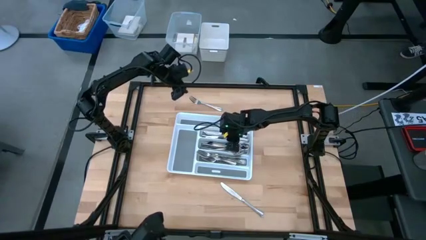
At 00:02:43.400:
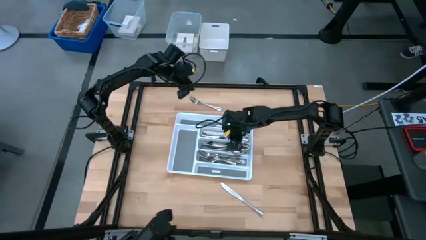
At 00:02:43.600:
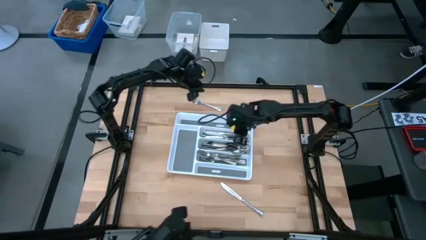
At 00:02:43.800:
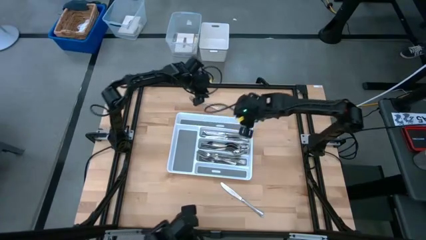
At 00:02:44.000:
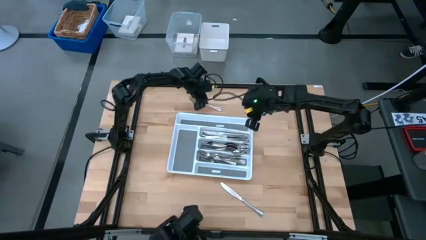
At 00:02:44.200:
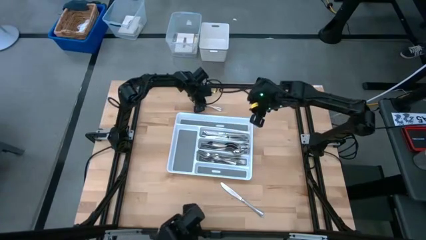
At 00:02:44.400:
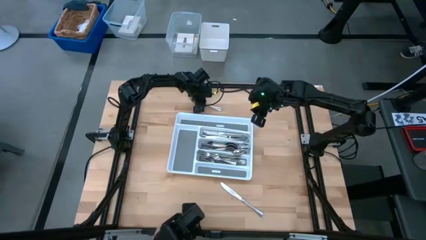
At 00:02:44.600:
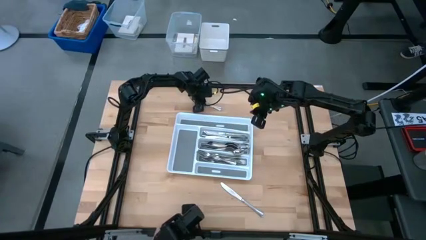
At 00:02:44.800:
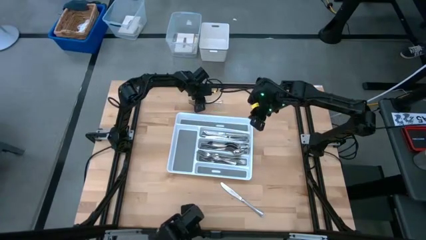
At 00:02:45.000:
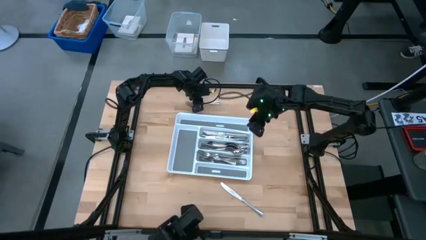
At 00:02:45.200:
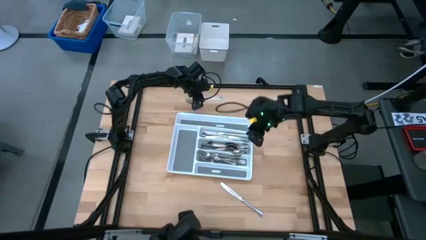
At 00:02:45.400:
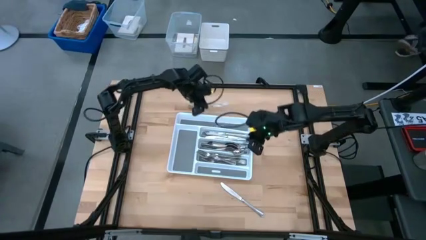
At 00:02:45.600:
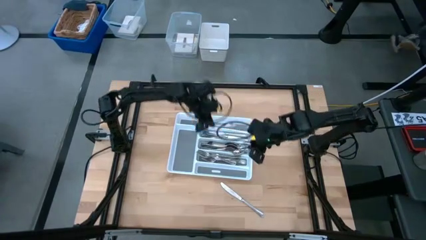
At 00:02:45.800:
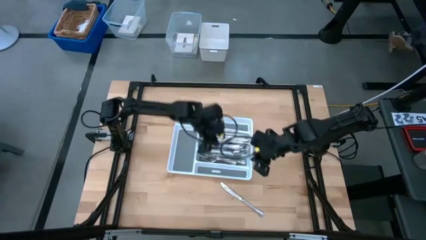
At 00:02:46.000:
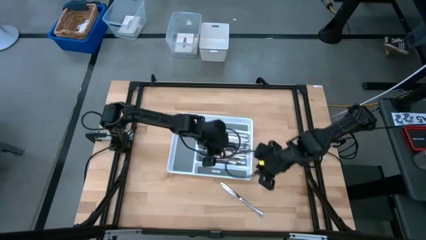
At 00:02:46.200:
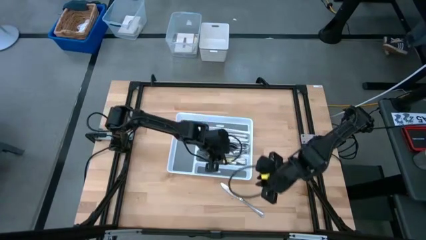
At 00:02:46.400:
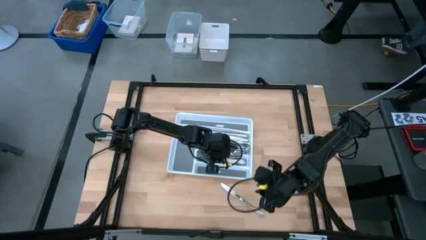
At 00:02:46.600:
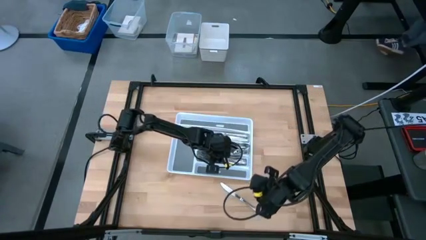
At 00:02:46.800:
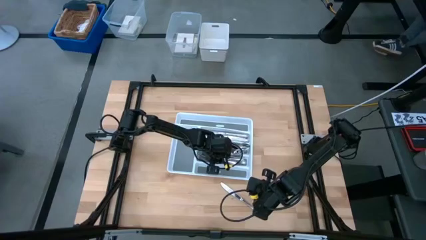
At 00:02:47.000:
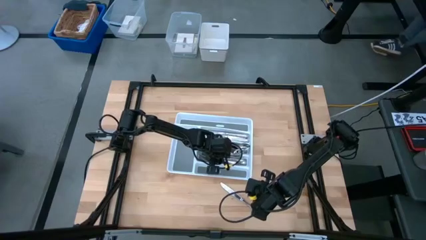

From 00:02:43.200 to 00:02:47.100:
Task: Sort silverware
Put the fork into the organizer tray

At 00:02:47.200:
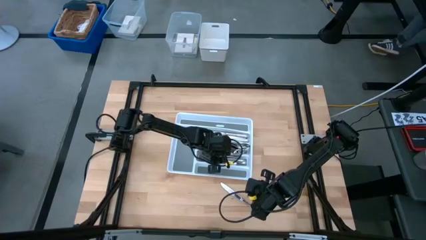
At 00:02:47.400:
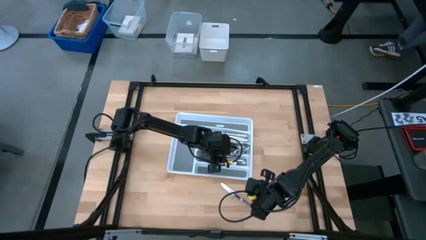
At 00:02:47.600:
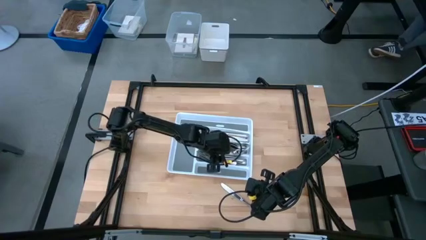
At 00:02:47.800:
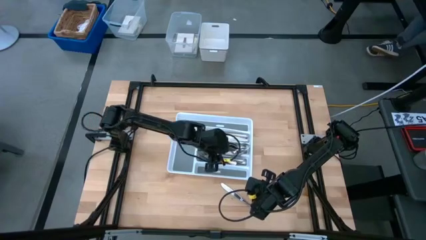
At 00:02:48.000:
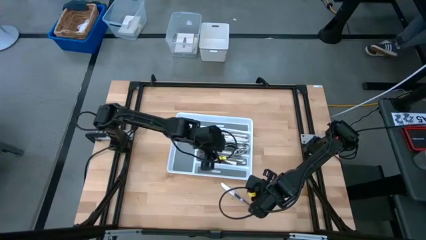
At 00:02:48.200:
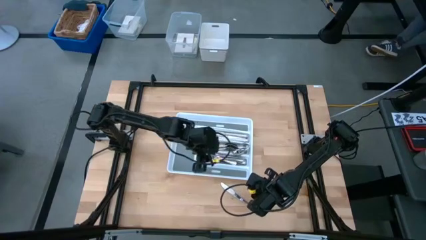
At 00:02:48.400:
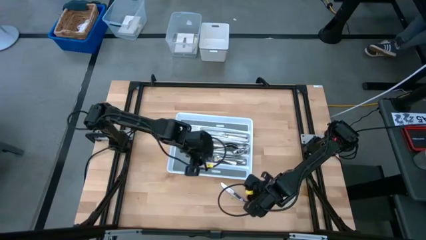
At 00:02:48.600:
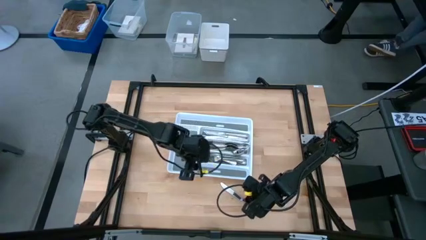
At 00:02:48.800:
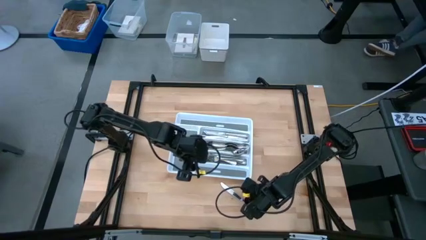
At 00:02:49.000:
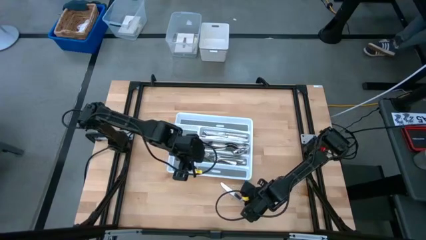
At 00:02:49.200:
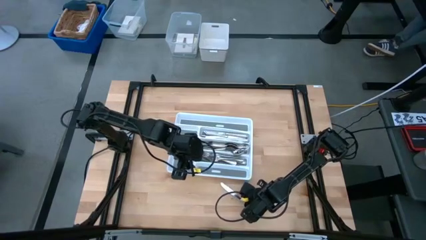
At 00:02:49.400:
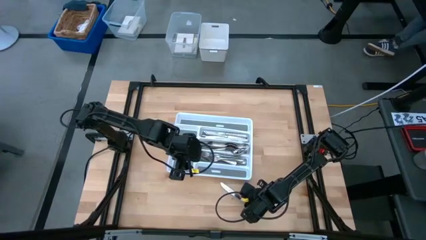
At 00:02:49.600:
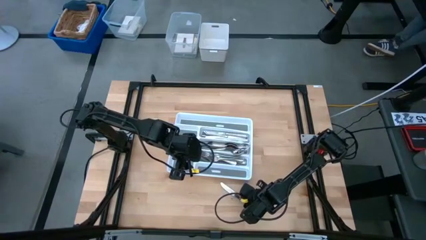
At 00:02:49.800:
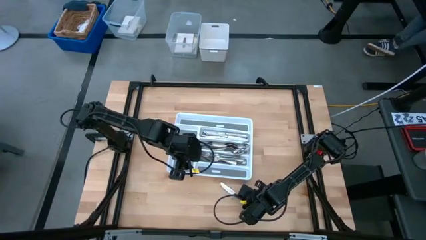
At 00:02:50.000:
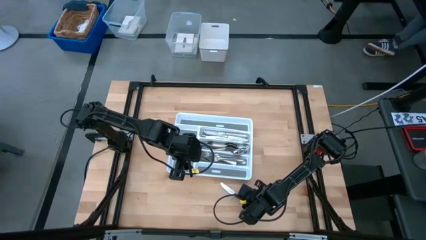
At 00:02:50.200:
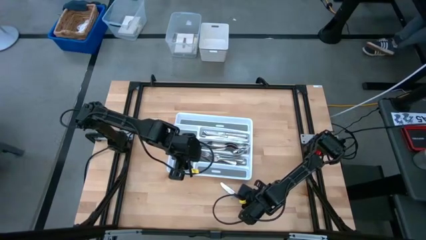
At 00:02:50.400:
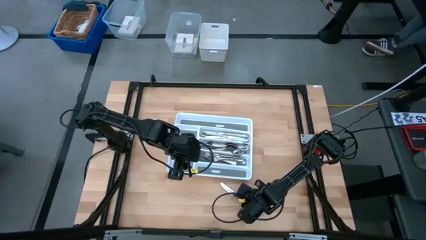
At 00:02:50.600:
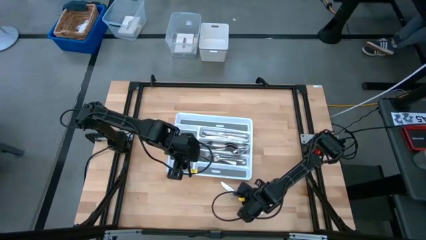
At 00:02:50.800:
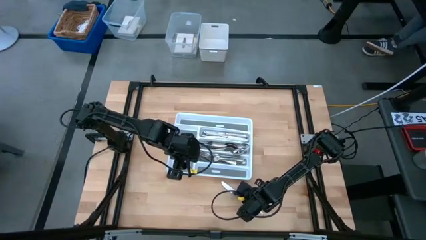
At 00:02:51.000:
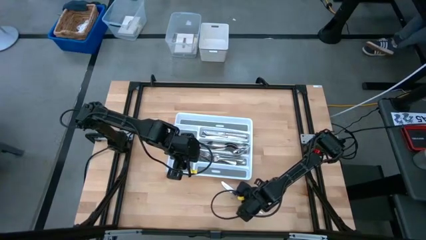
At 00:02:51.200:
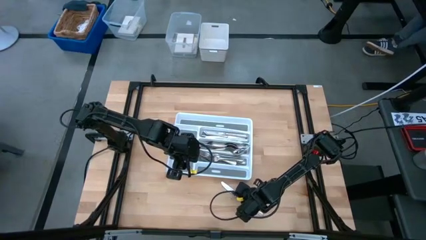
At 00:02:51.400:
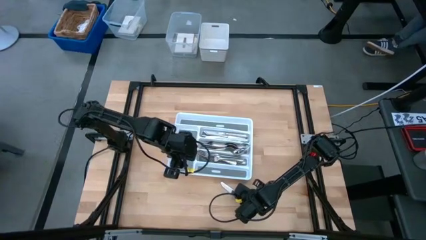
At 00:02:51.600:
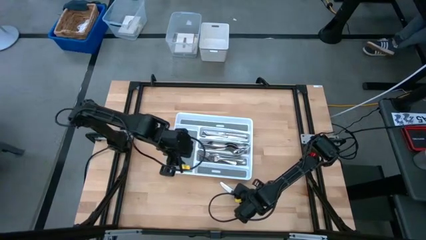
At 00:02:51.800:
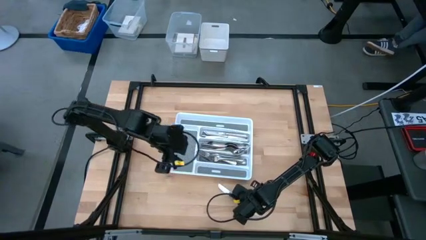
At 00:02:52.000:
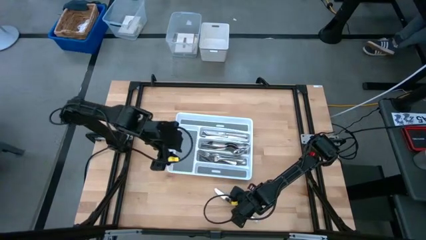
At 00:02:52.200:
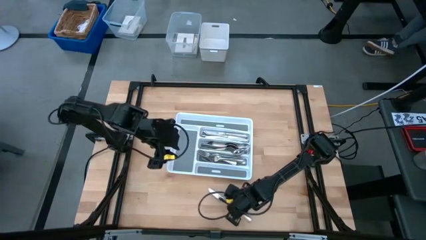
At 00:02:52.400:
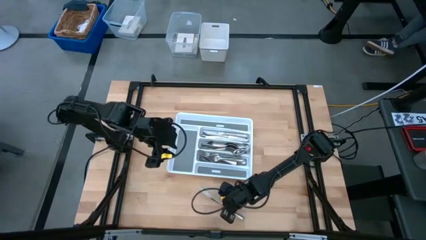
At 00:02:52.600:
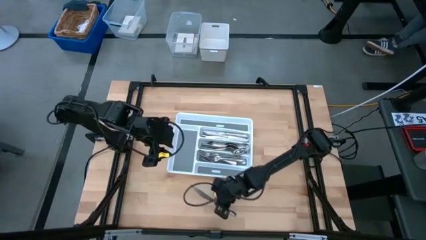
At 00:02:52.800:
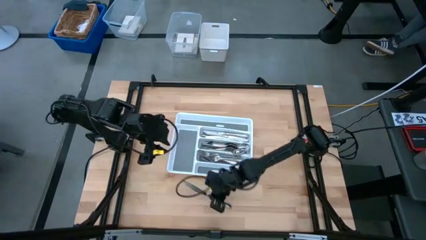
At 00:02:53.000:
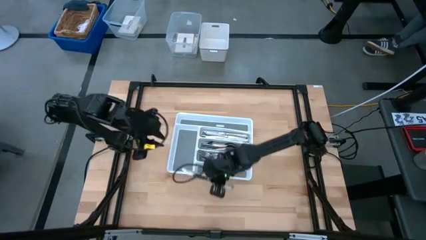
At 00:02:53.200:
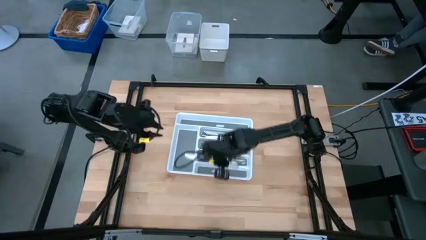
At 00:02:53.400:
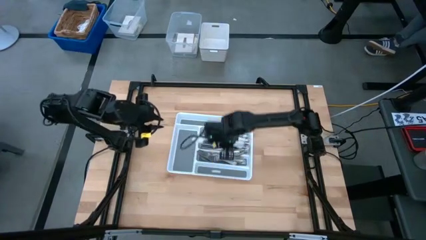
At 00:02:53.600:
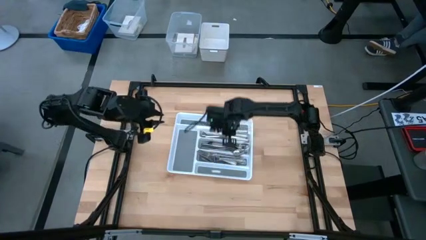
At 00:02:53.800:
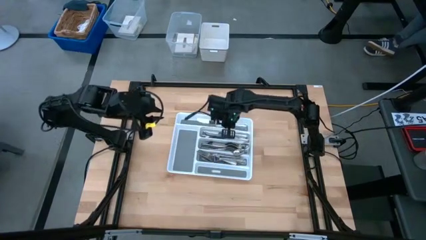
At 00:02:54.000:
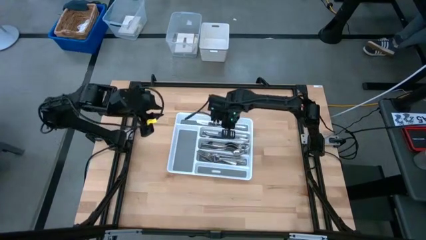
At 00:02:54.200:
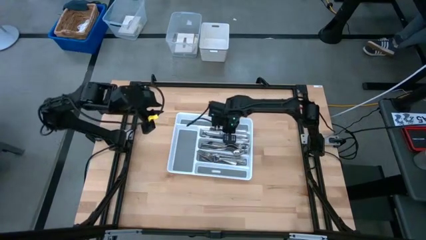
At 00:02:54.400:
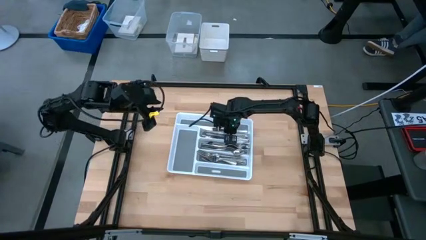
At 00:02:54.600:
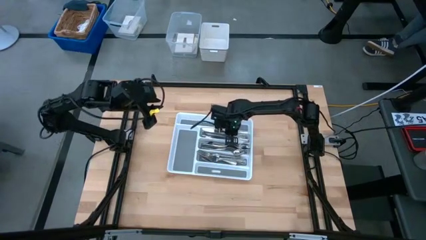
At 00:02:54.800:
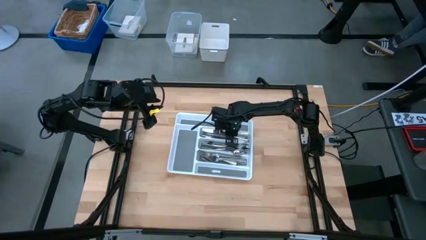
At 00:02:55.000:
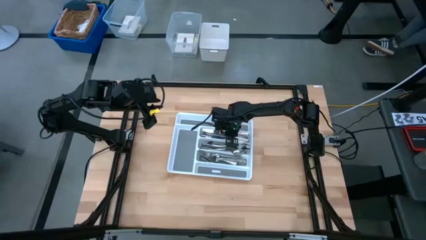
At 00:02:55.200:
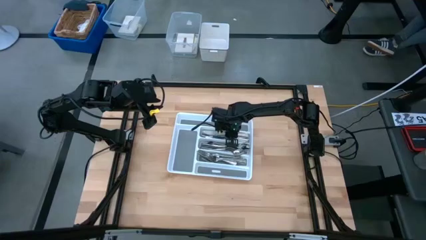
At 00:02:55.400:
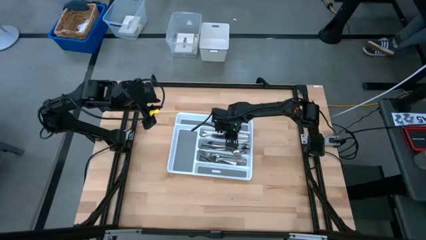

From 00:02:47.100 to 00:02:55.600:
Put the knife into the organizer tray
